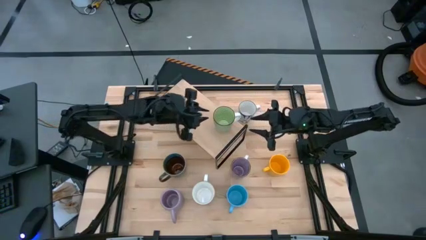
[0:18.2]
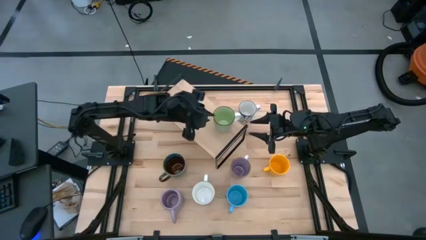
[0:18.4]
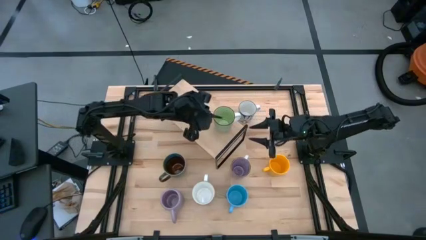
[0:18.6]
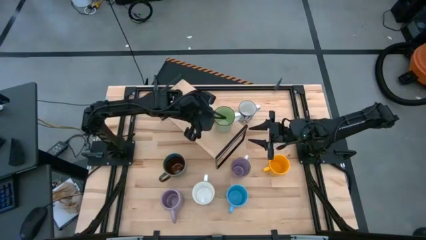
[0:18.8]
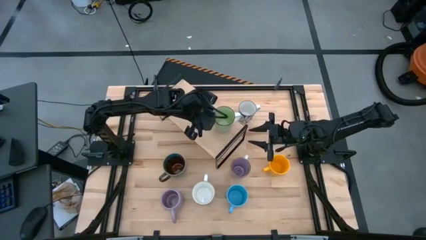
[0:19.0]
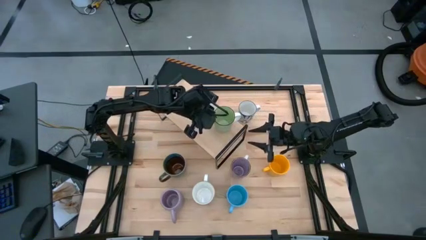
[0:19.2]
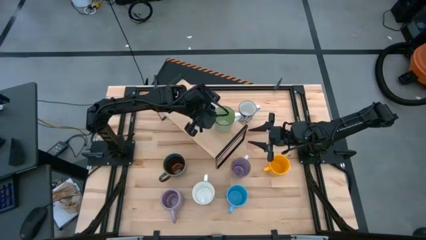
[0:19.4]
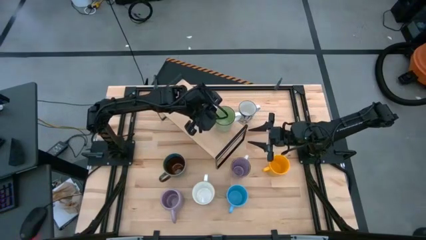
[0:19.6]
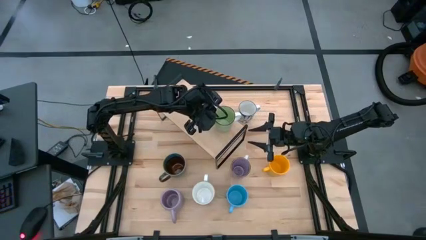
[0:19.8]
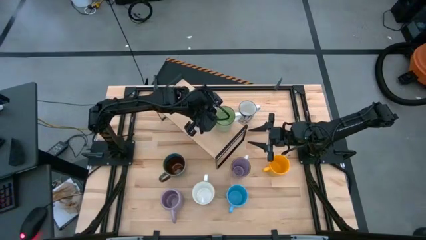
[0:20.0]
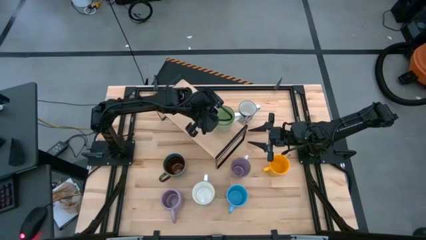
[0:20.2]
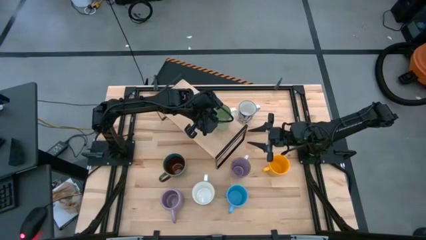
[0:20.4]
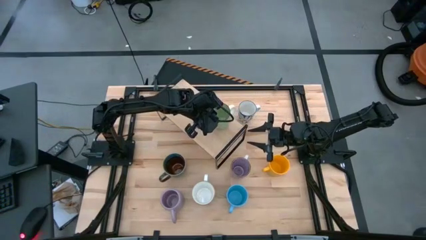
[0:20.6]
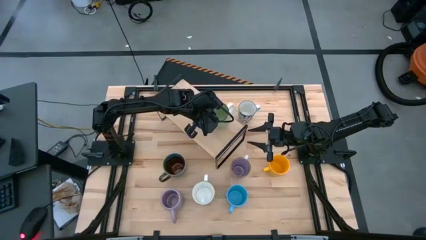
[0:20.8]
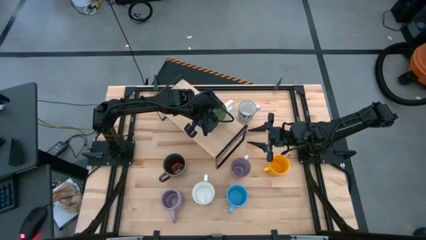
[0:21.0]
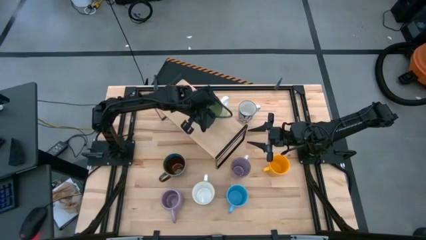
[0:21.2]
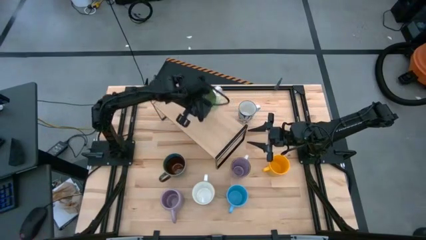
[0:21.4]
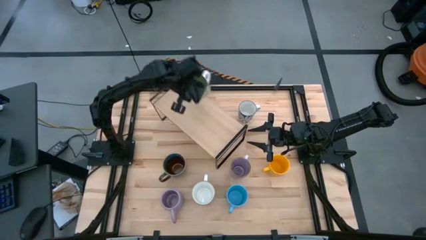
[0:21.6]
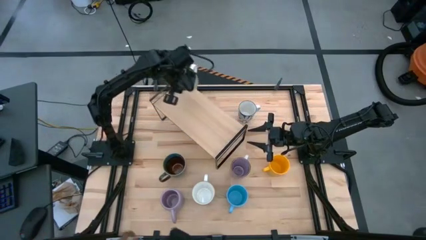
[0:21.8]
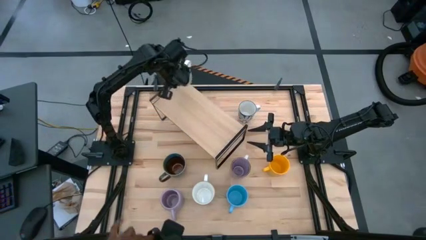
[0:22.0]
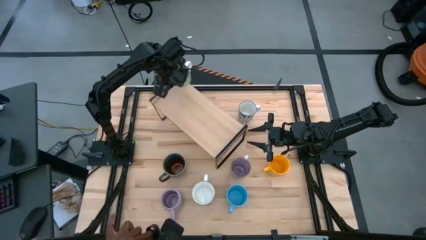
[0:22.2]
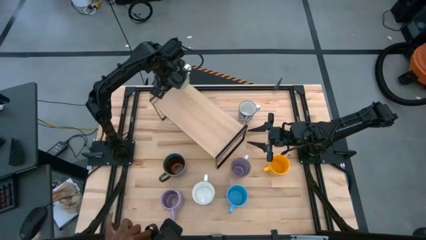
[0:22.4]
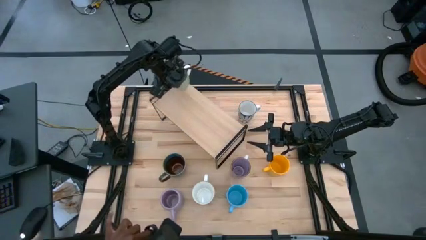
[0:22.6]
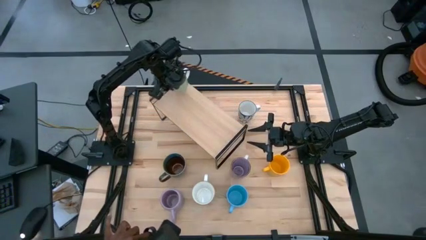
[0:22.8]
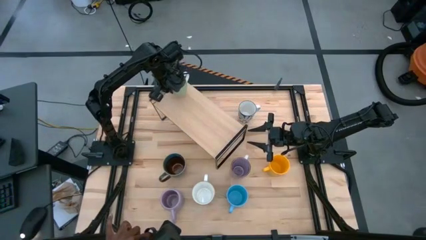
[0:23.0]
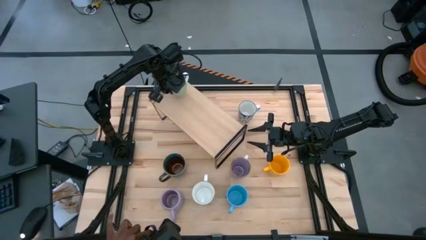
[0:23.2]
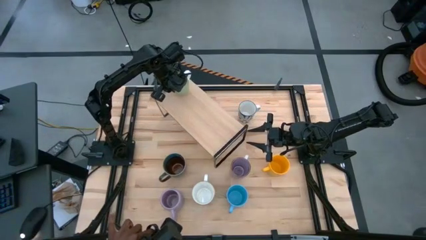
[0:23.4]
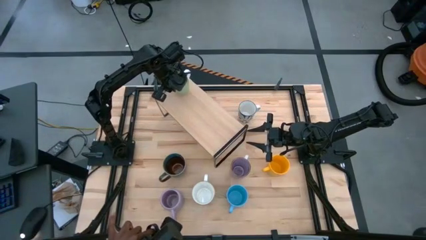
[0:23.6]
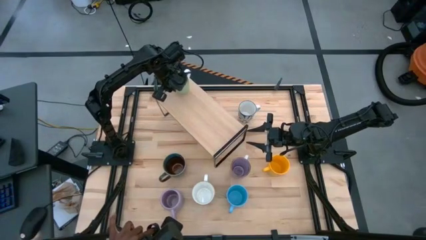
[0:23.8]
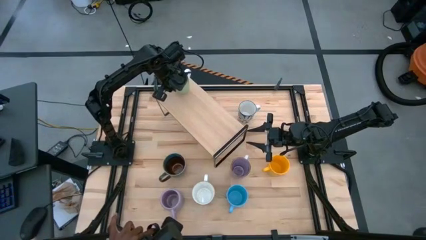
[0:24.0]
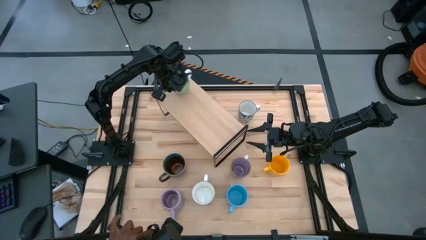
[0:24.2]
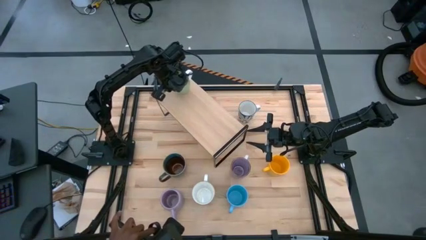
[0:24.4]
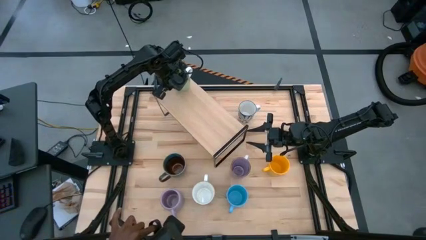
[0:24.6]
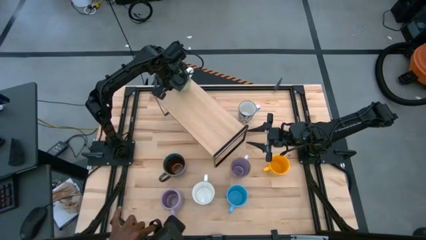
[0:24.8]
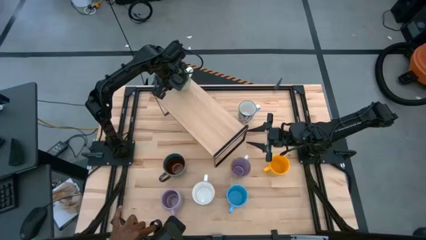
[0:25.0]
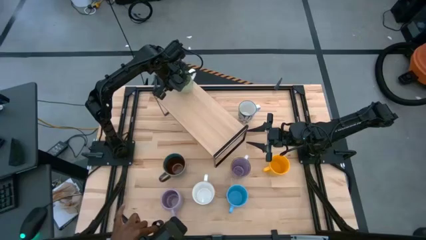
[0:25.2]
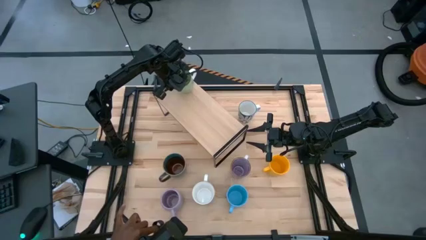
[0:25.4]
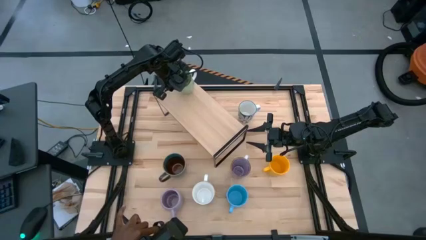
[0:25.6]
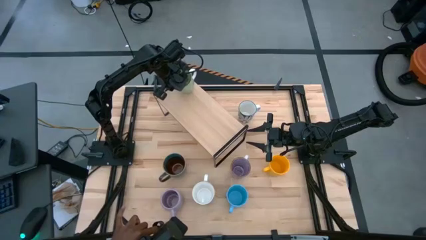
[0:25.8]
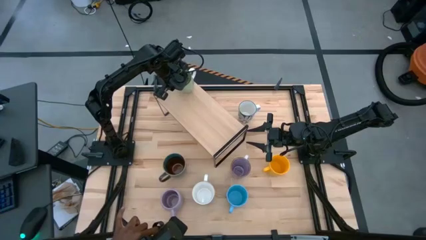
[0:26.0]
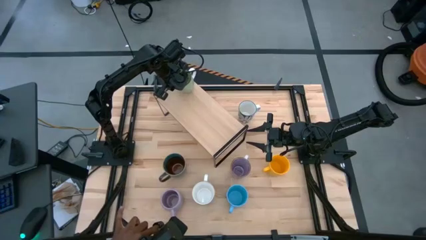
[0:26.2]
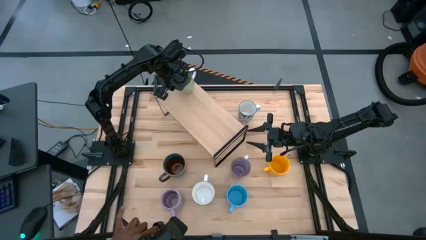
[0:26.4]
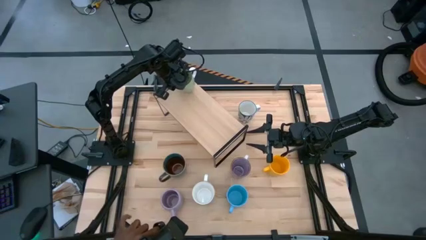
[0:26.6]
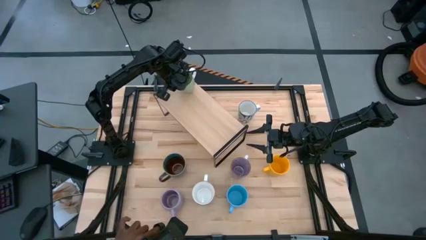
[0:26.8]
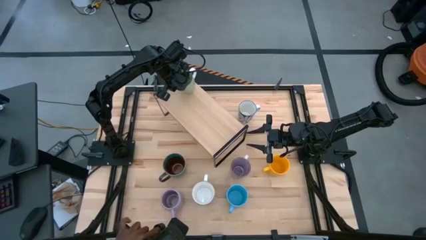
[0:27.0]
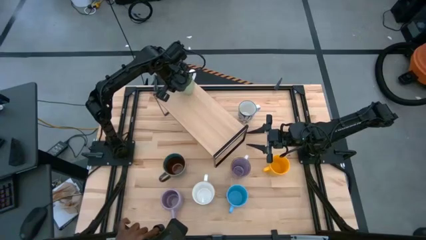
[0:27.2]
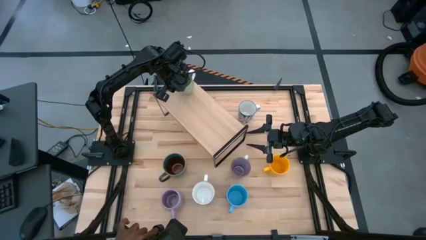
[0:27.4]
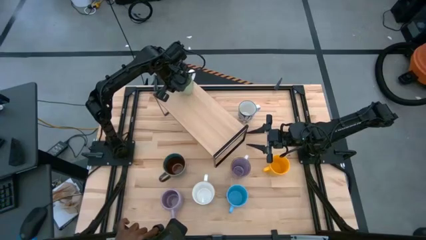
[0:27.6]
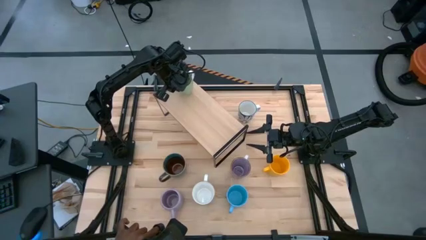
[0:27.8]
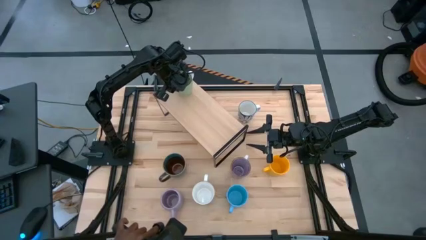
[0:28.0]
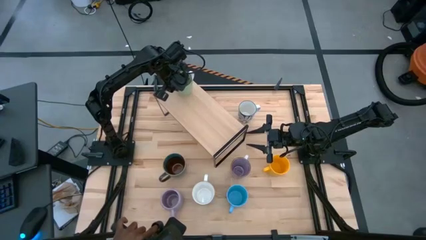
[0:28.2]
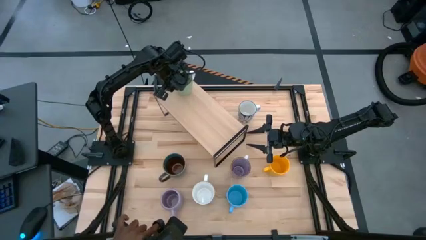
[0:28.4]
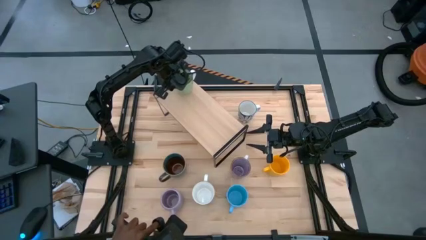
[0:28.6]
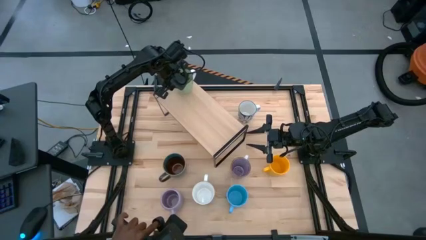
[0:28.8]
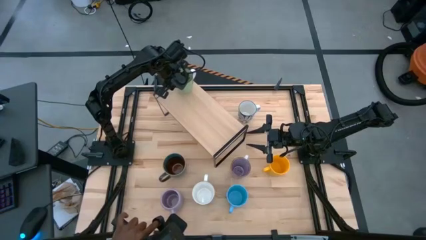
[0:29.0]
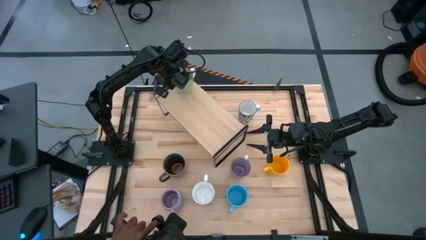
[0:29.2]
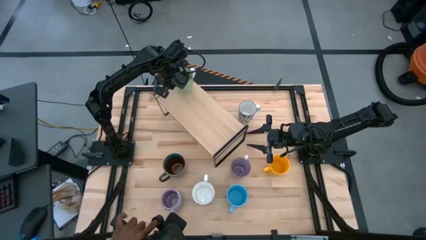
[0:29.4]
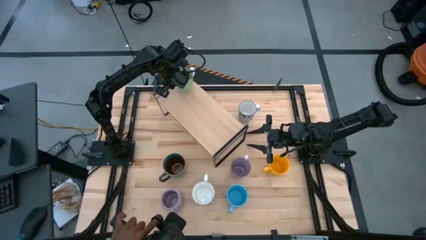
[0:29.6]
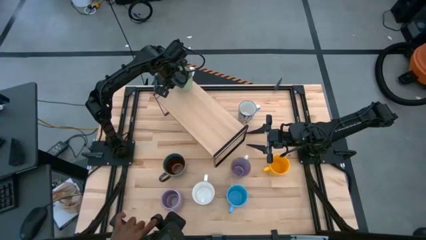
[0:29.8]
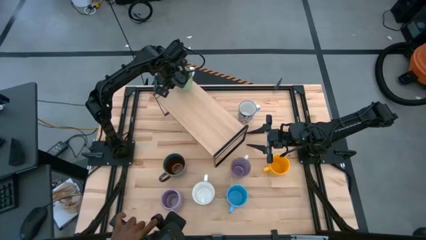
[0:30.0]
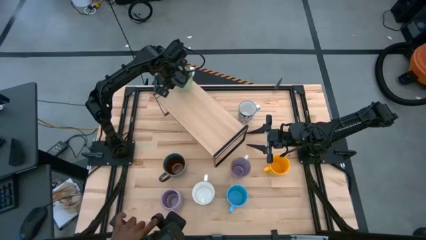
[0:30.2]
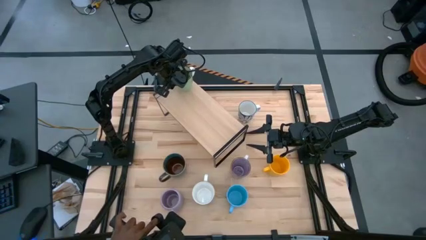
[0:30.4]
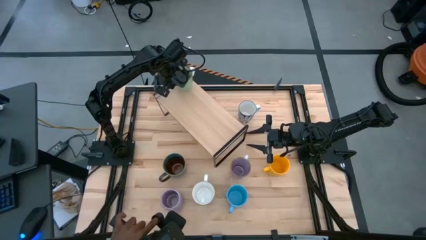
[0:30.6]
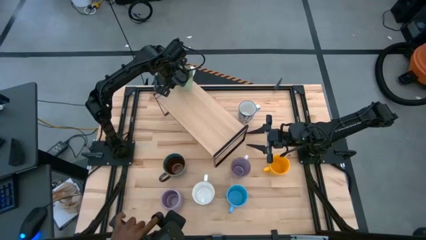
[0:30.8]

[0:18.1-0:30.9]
Task: Place coffee mugs
Put the green patterned mug on the shelf

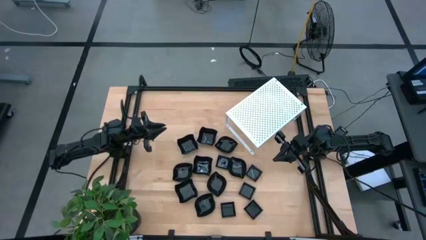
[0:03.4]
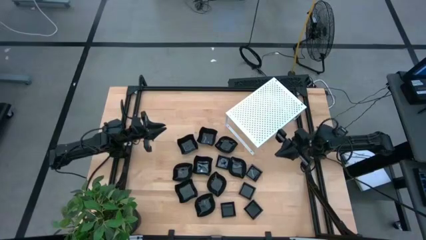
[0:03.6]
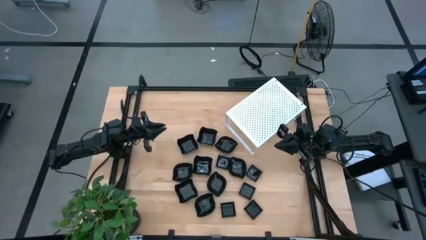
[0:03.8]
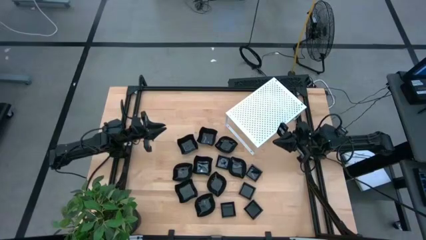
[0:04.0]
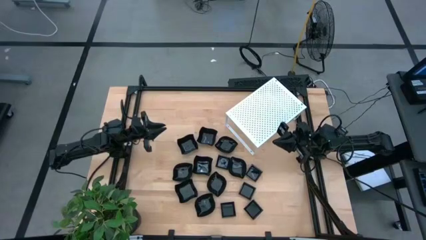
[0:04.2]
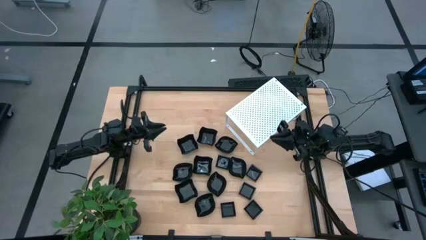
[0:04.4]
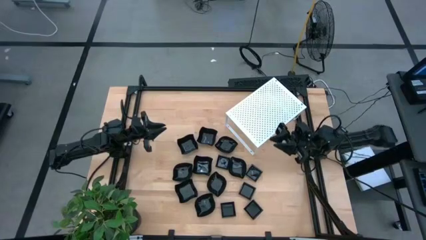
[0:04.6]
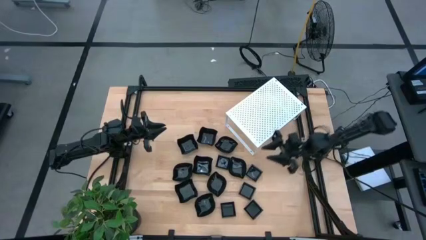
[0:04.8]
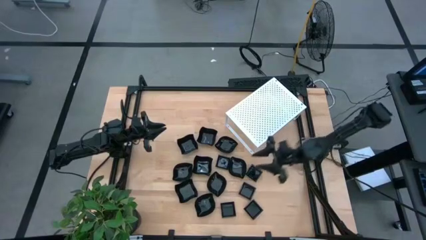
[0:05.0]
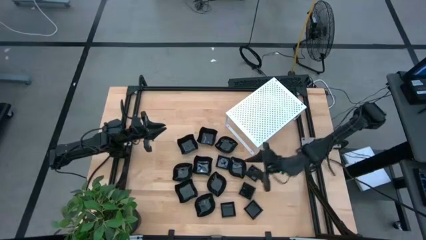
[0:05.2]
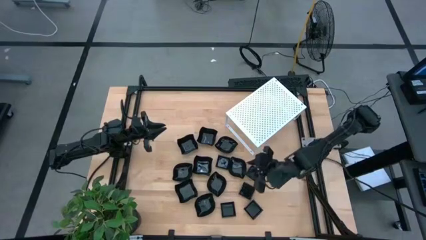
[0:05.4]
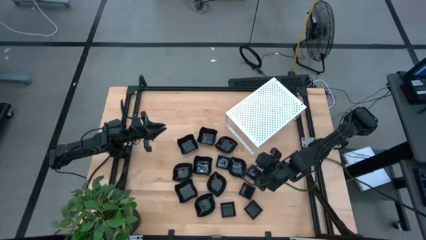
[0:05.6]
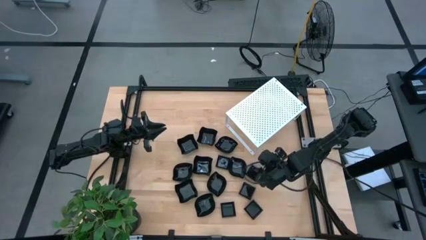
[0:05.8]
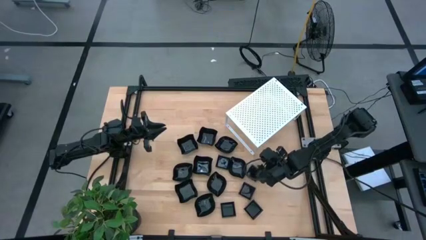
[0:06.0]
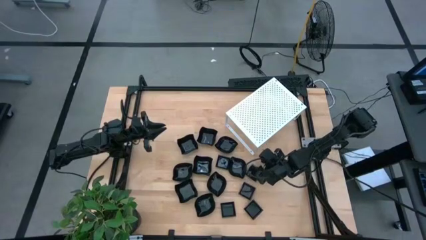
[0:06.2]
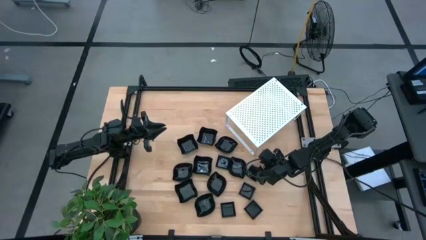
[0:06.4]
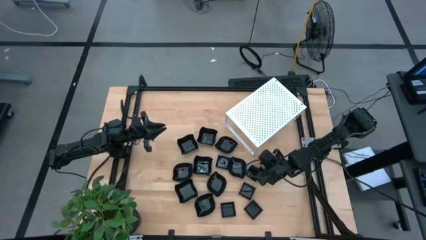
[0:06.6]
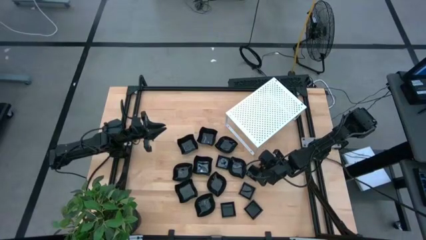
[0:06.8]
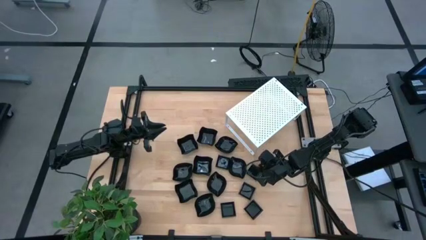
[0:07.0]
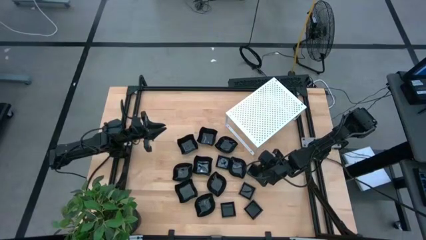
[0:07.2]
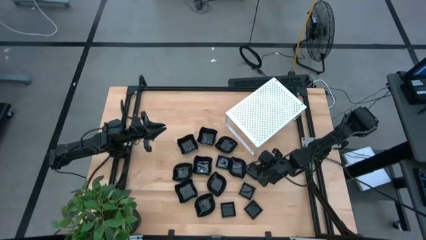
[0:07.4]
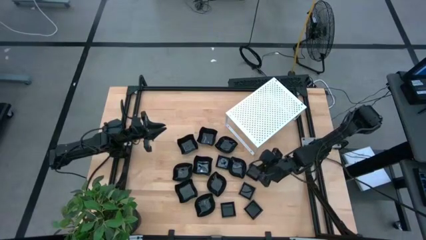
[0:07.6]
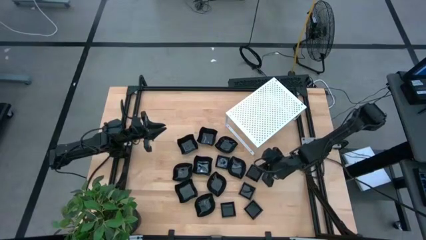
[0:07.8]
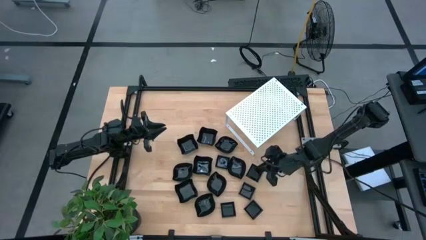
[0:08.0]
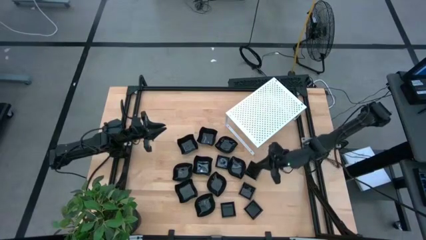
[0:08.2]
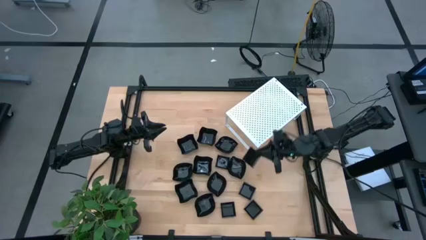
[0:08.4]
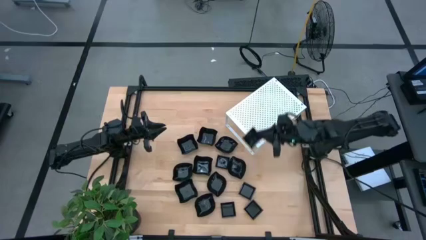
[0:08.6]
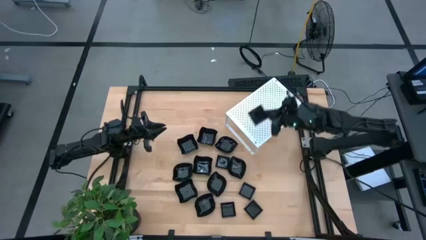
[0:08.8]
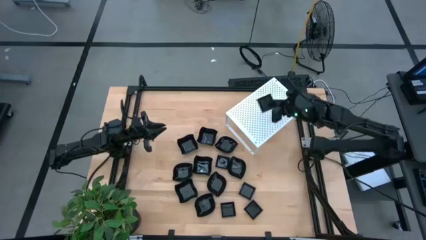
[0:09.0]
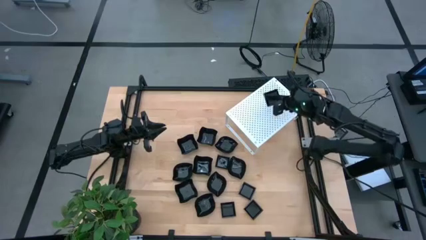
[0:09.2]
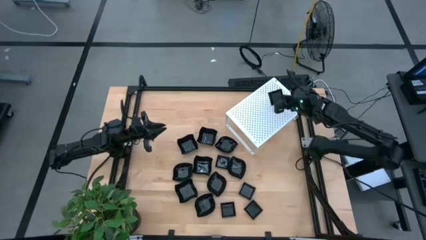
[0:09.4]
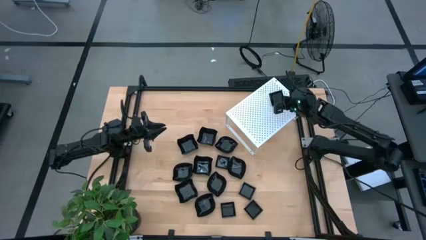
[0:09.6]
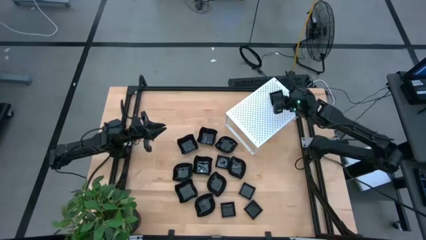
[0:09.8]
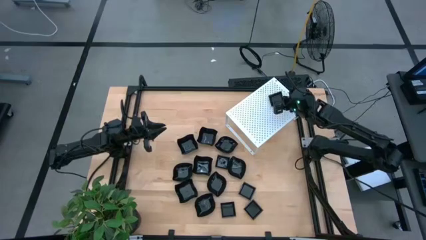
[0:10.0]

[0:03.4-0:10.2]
Task: Pick & Place Mini shaped plates
Put the black square plate on the shelf
